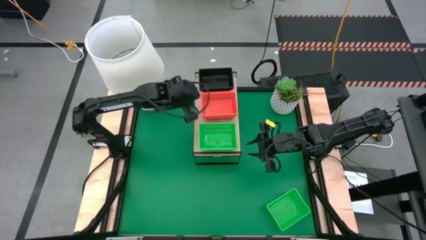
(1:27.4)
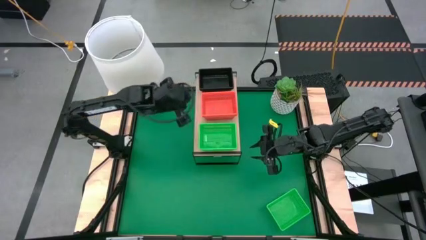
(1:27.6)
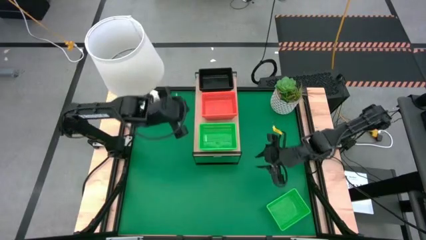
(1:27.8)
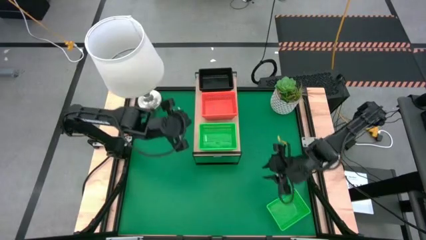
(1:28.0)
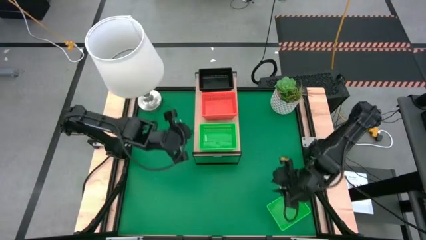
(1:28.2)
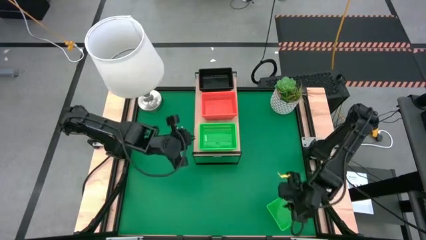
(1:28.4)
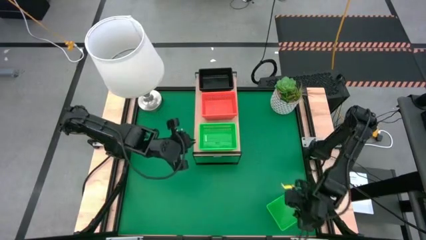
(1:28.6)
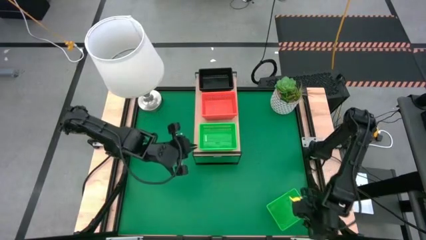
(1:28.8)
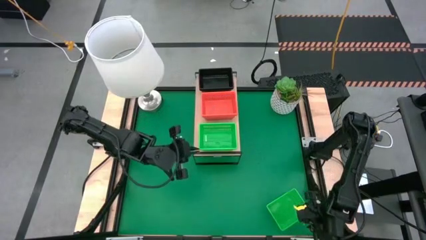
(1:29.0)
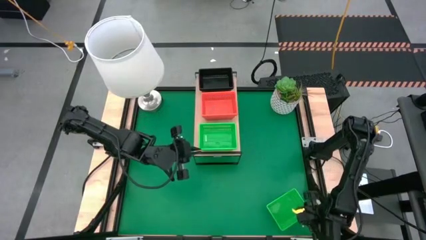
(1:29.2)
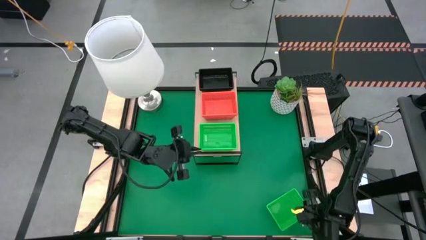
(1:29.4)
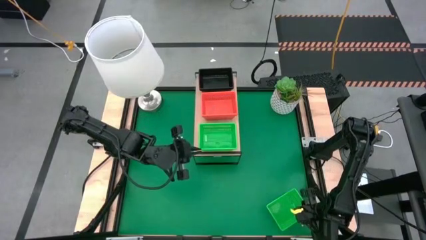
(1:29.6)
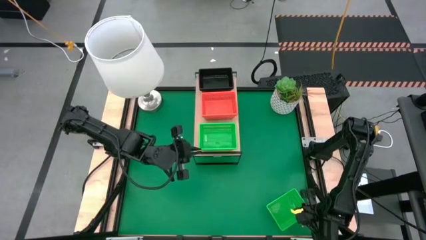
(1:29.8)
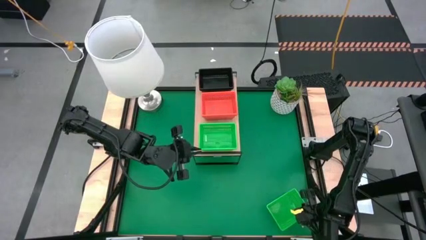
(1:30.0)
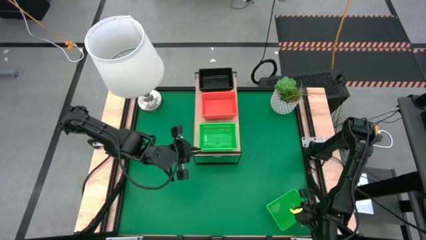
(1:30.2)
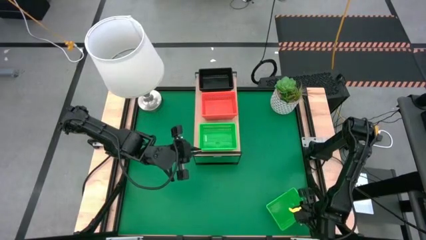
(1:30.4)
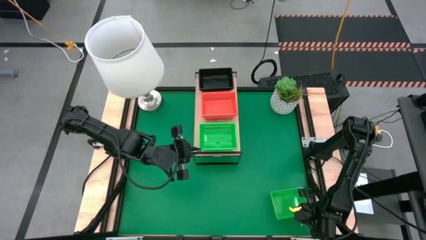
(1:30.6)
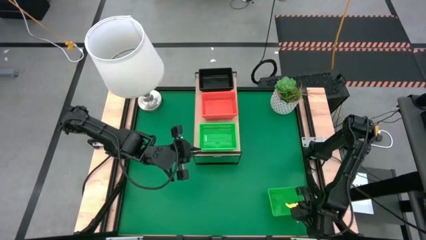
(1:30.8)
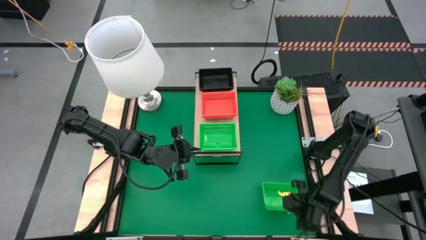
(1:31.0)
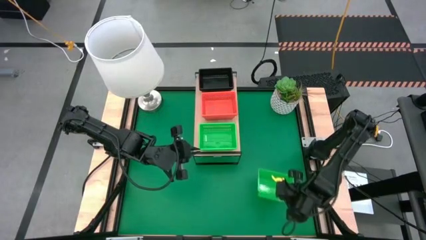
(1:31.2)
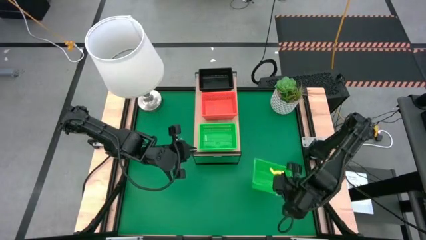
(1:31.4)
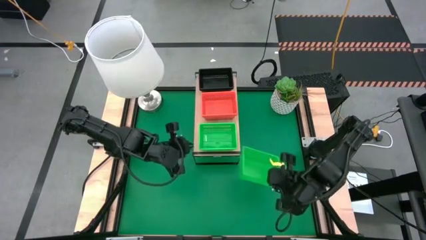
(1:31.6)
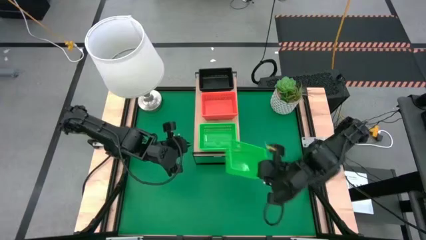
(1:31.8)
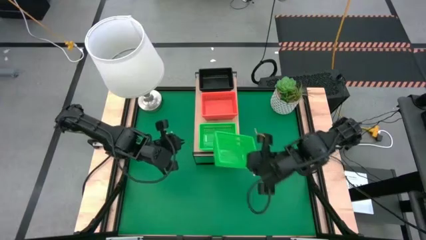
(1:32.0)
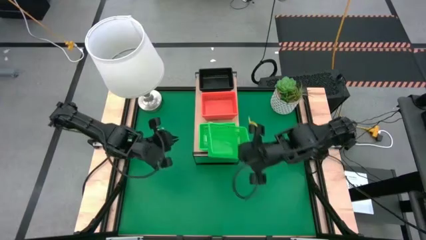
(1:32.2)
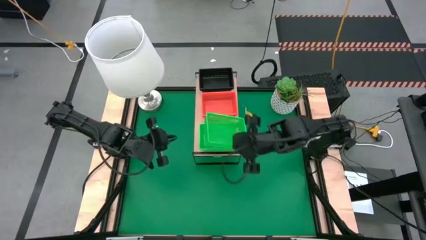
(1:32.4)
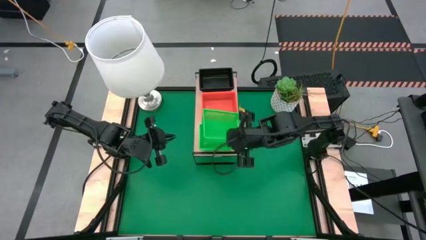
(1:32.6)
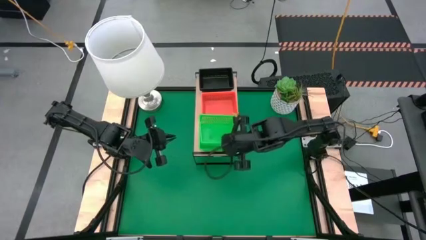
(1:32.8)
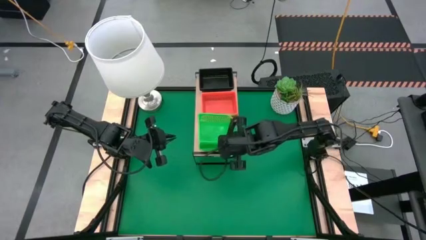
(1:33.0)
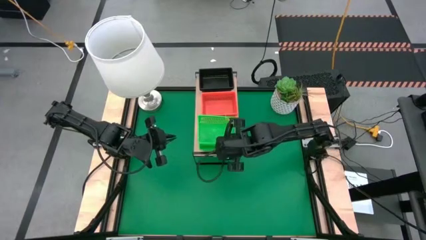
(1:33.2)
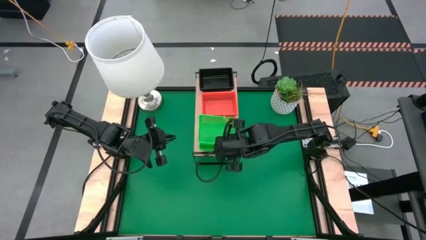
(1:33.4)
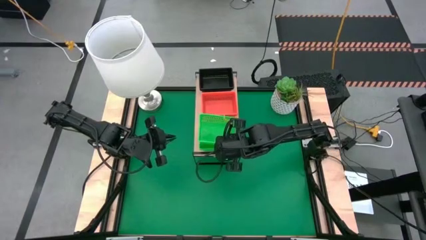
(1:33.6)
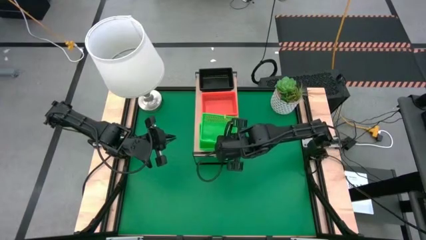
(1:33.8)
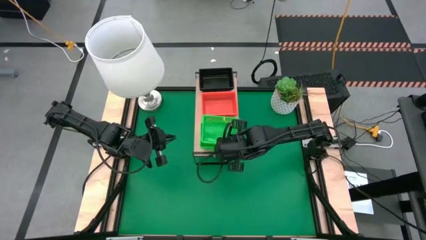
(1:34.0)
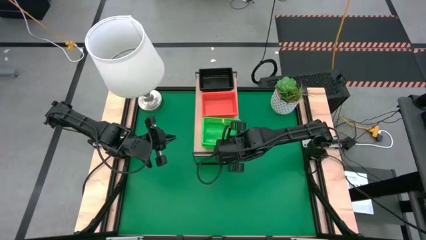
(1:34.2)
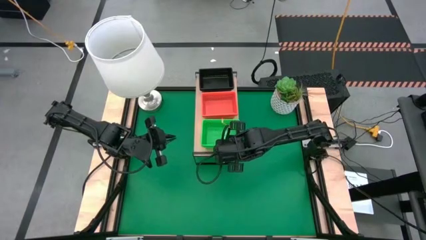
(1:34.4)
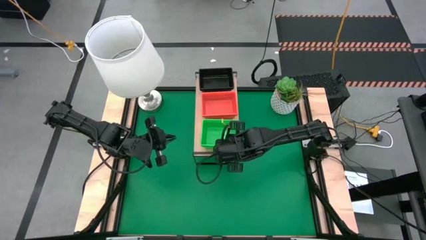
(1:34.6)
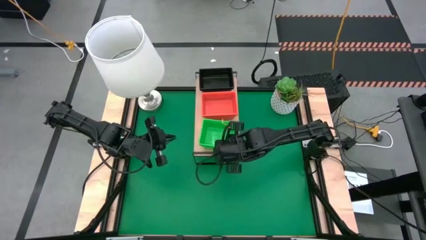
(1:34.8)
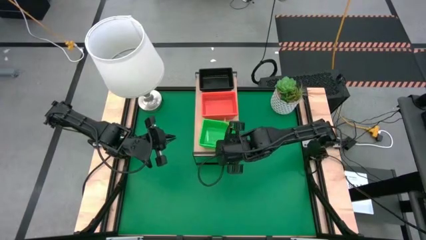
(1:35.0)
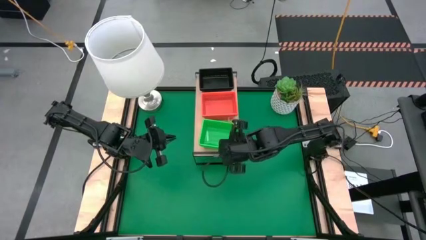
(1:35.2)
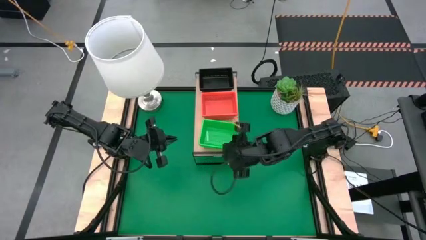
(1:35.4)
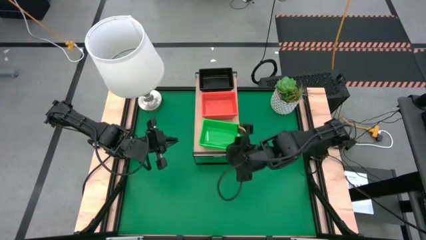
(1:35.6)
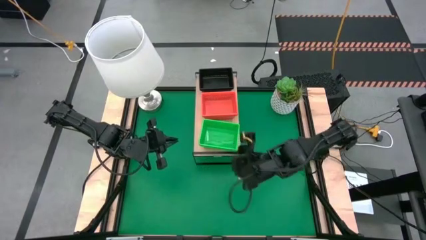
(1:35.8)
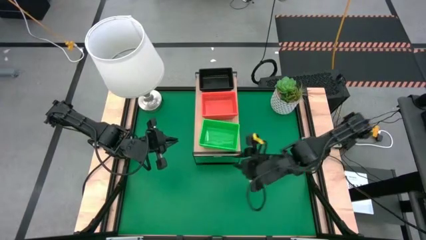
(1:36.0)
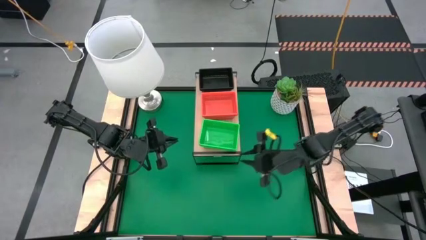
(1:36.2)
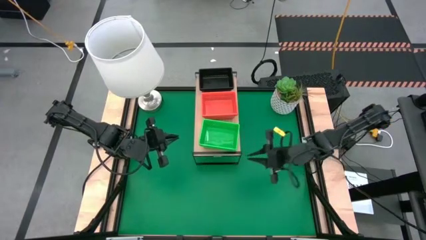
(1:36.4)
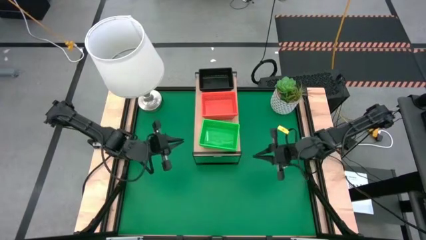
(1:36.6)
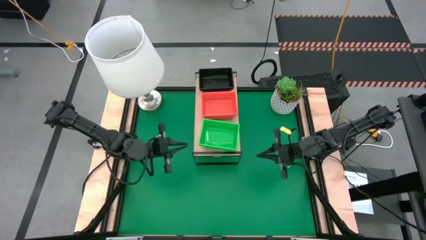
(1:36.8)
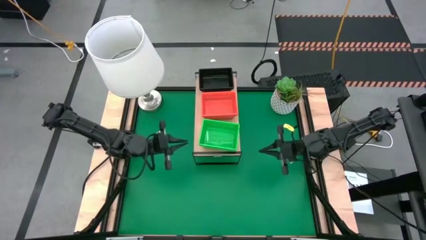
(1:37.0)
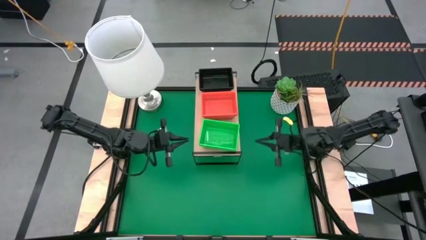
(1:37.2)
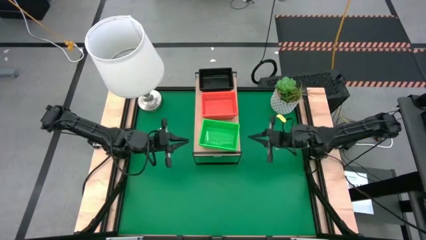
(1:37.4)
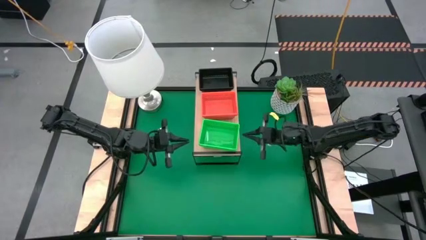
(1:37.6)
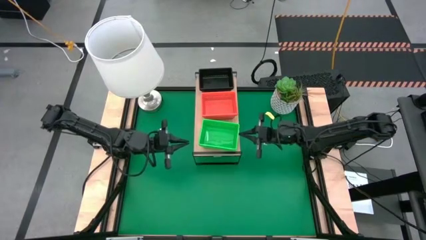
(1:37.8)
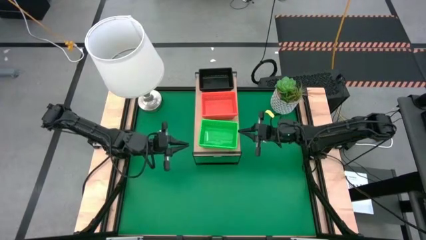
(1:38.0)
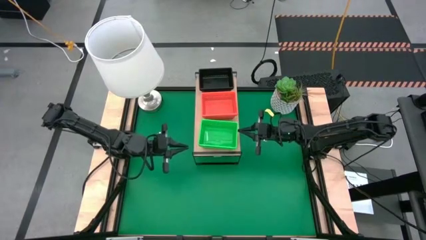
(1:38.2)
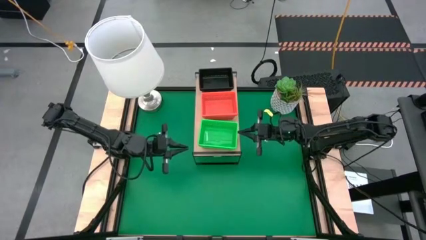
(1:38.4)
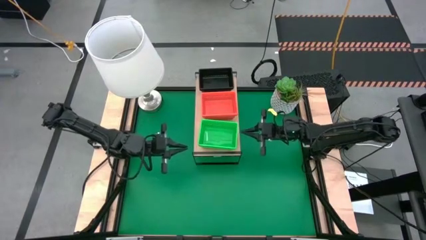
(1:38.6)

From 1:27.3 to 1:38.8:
Task: Stack baskets on shelf by color
Stack the green bin on top of the green bins on the shelf

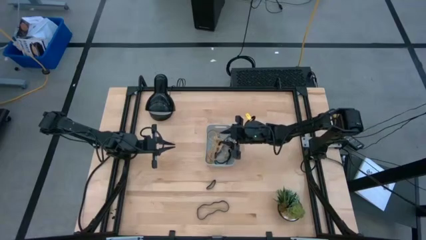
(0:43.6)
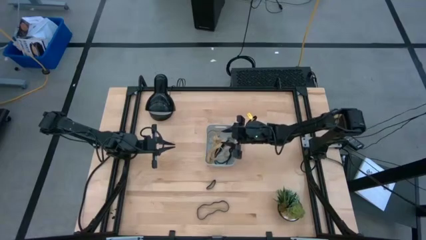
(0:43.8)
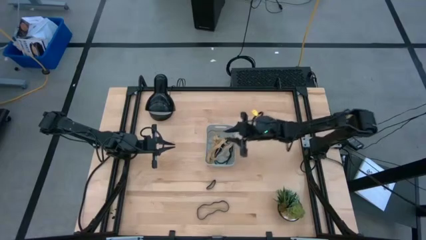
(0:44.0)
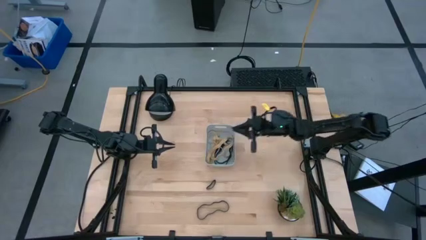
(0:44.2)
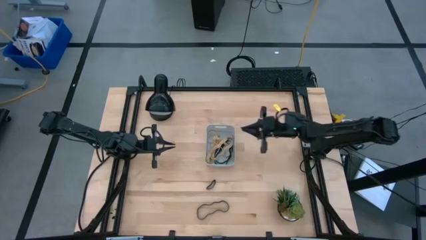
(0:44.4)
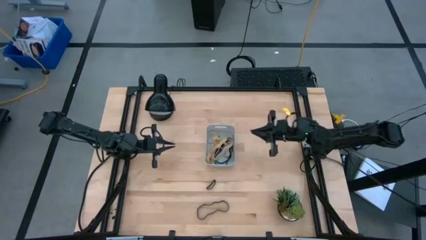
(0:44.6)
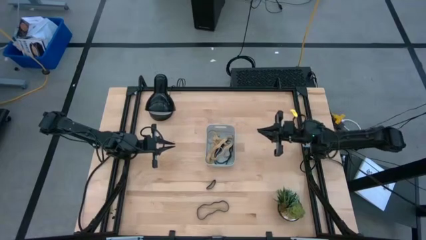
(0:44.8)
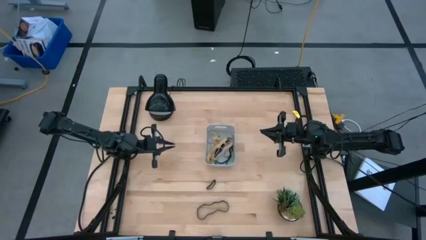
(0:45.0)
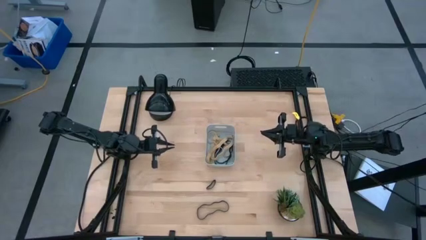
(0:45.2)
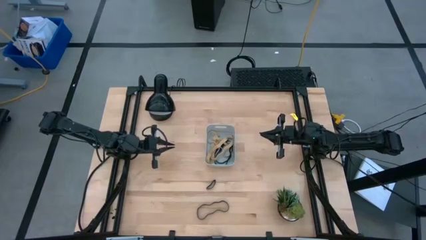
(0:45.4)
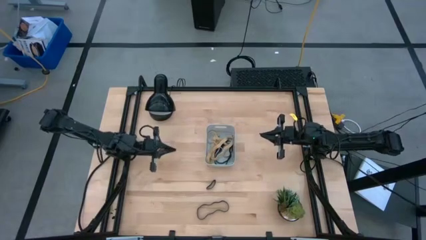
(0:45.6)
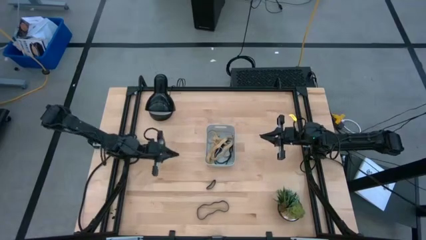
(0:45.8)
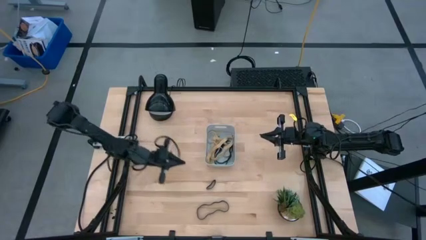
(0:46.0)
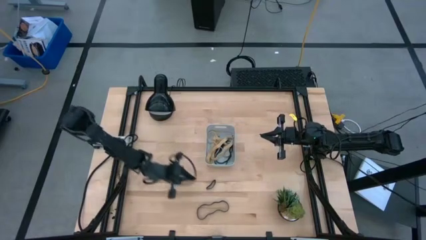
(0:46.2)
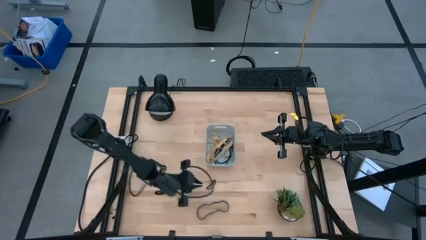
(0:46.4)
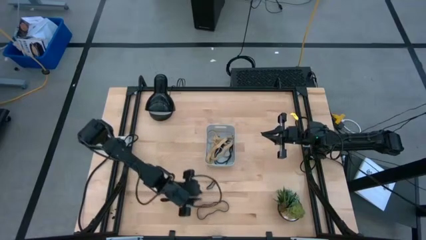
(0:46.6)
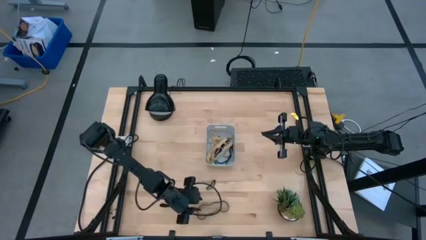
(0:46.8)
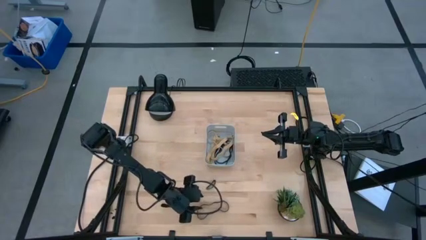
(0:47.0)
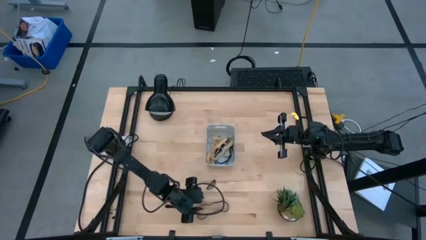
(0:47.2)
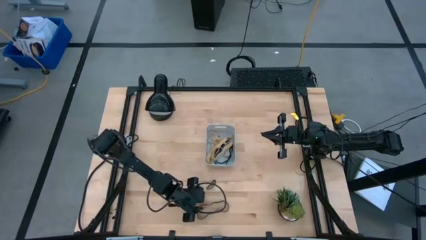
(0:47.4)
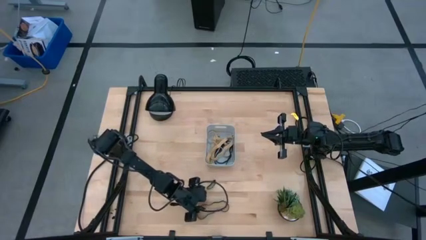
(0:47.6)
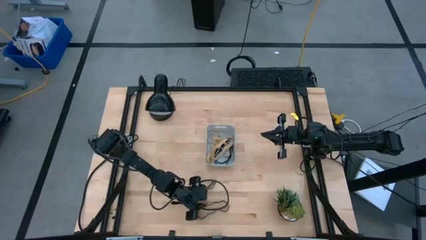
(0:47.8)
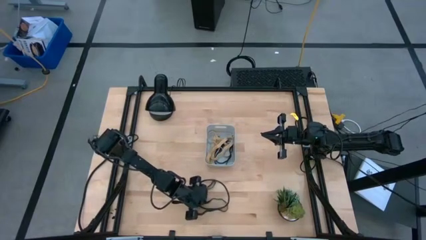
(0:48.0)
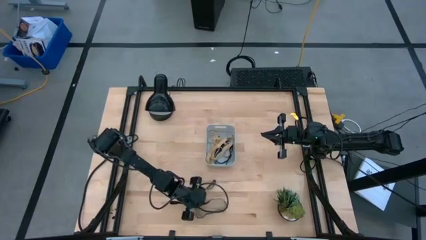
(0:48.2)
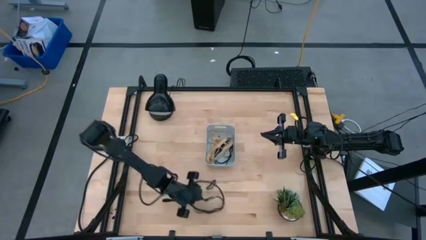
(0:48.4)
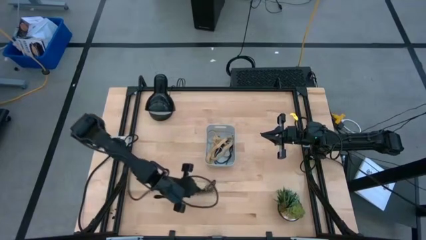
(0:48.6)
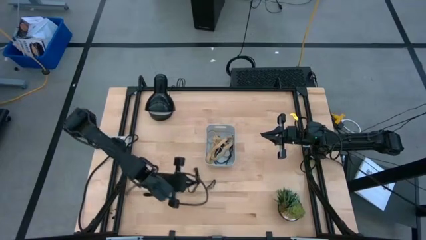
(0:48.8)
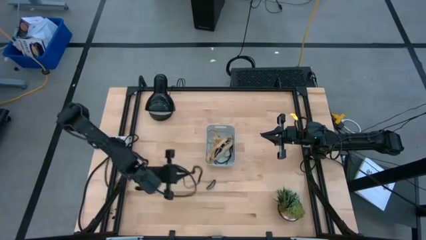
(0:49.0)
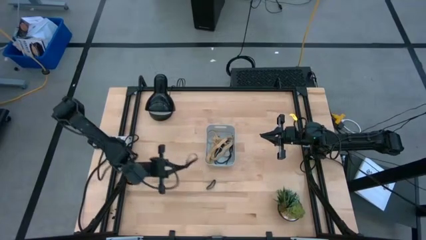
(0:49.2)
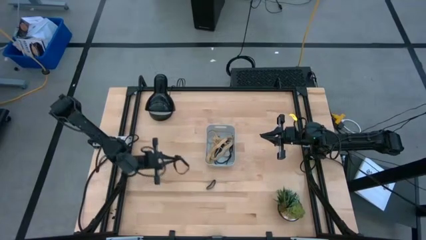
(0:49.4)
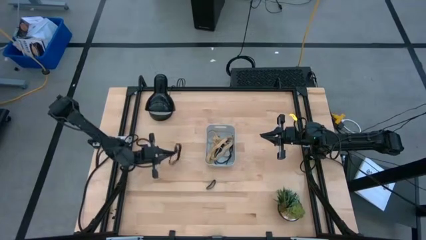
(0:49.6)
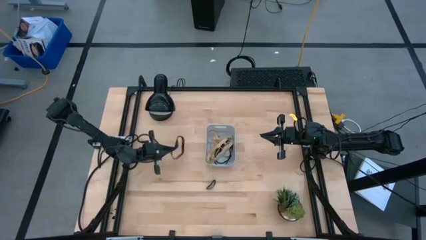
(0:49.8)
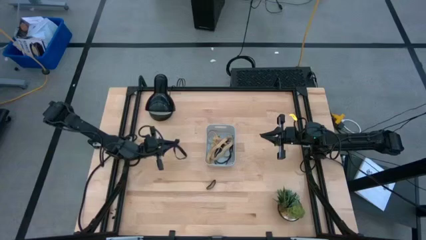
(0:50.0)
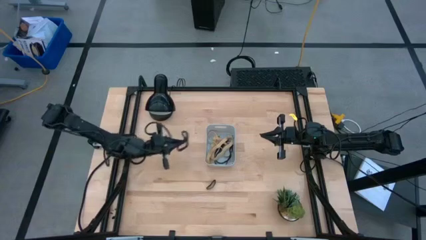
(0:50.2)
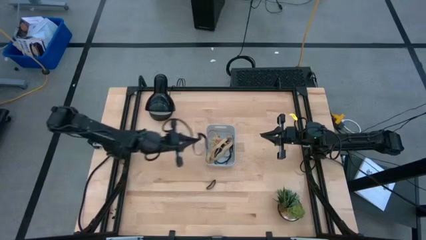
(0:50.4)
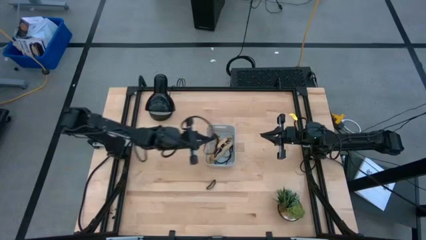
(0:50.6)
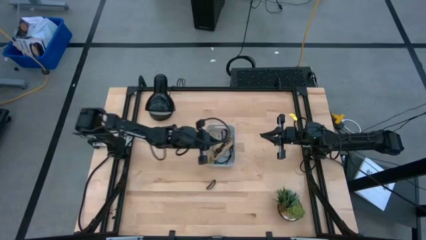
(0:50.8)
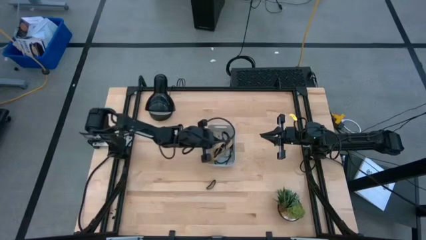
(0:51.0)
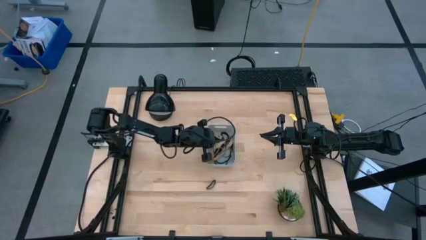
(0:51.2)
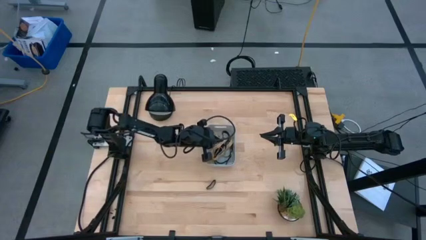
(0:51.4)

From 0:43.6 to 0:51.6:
Task: Pick and place rubber bands into bin
Put the large black rubber band into the gray bin
